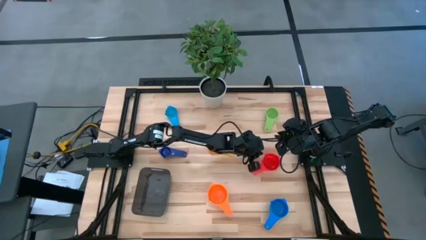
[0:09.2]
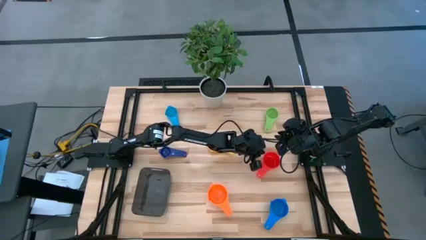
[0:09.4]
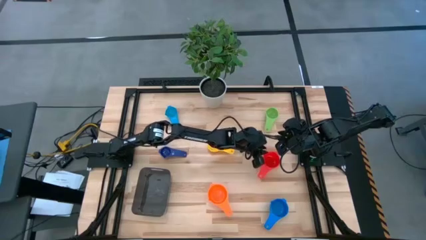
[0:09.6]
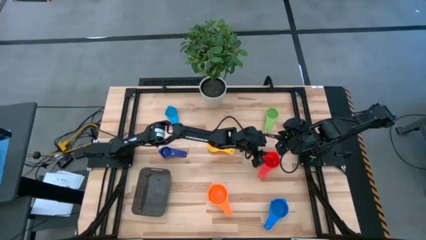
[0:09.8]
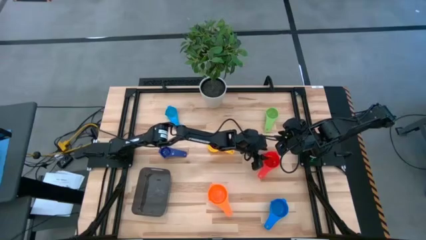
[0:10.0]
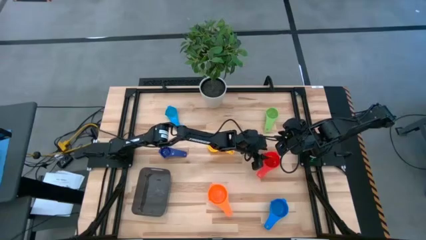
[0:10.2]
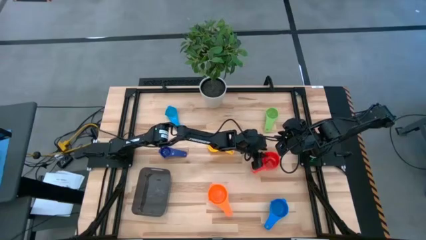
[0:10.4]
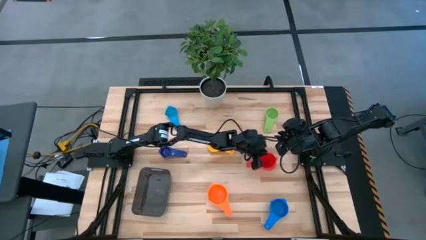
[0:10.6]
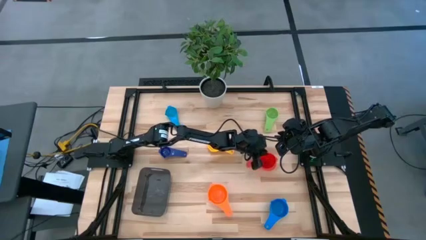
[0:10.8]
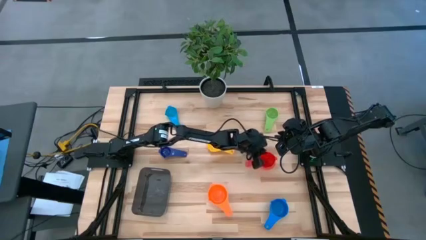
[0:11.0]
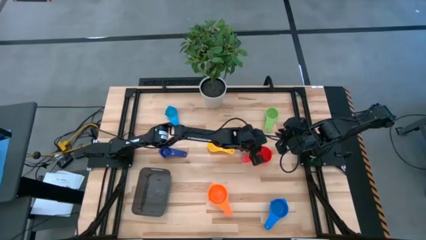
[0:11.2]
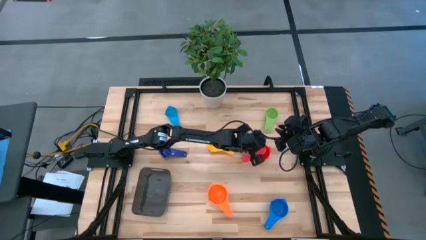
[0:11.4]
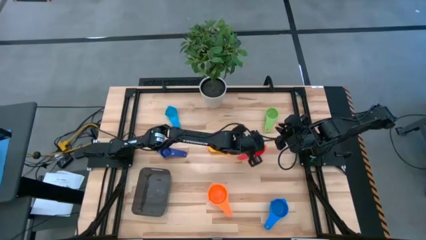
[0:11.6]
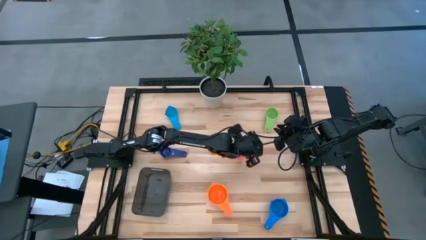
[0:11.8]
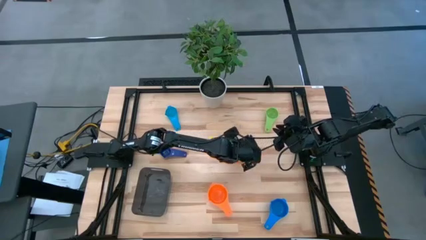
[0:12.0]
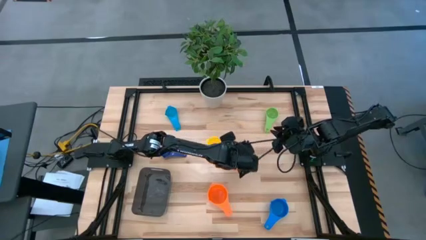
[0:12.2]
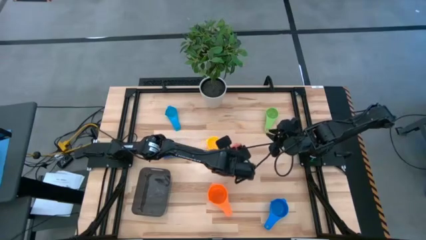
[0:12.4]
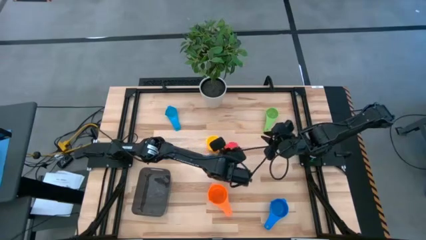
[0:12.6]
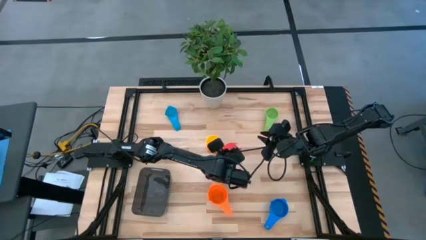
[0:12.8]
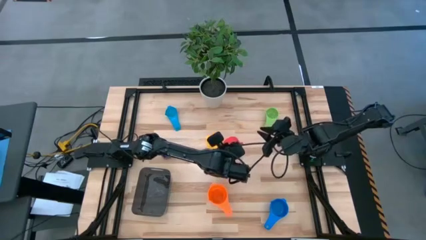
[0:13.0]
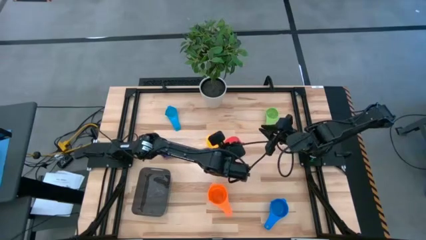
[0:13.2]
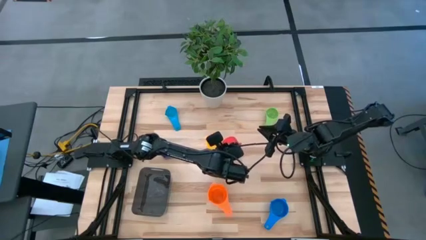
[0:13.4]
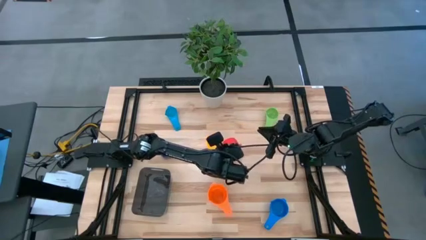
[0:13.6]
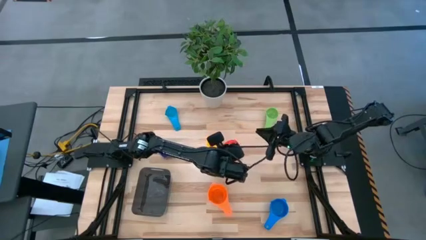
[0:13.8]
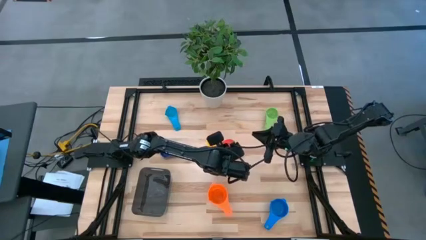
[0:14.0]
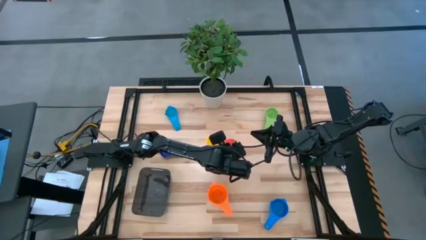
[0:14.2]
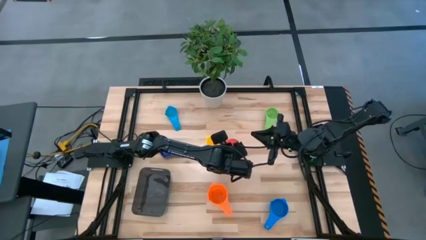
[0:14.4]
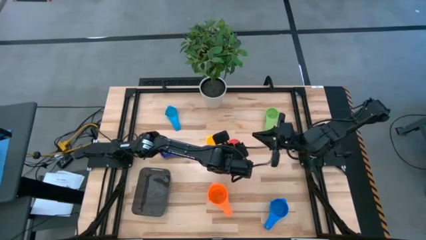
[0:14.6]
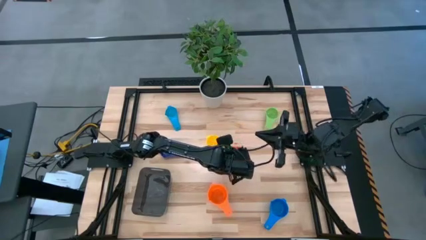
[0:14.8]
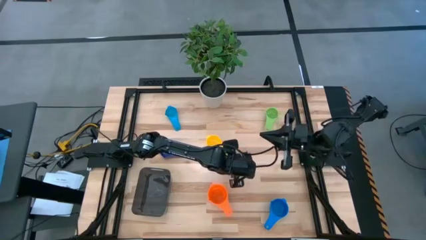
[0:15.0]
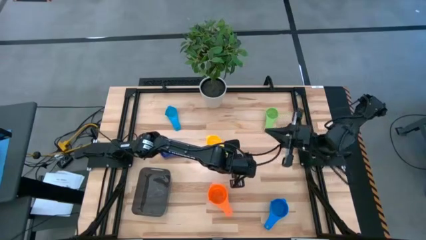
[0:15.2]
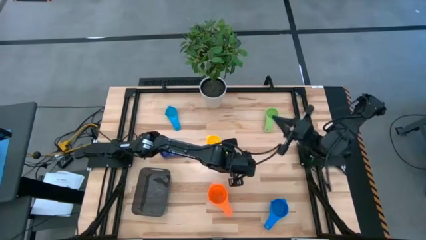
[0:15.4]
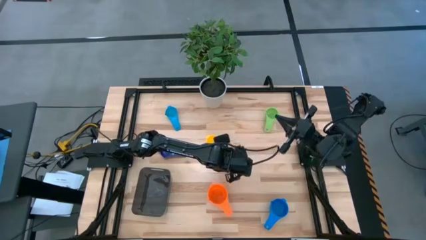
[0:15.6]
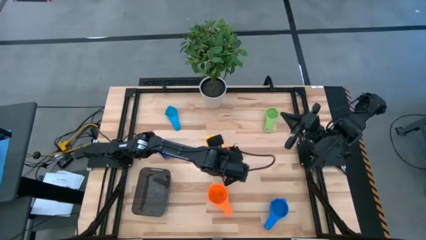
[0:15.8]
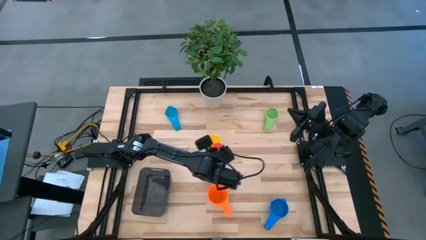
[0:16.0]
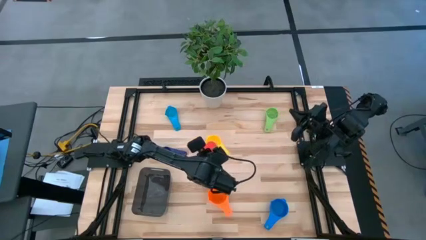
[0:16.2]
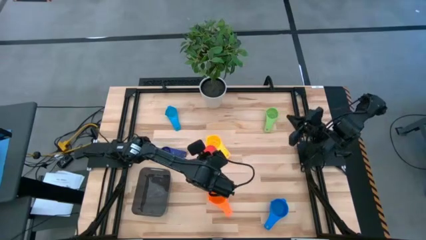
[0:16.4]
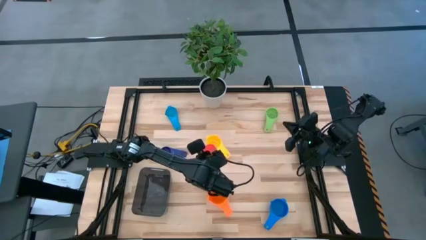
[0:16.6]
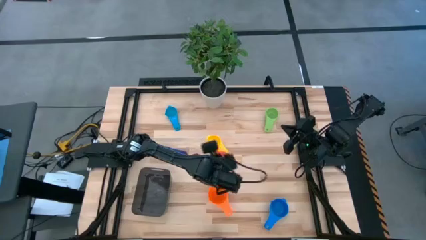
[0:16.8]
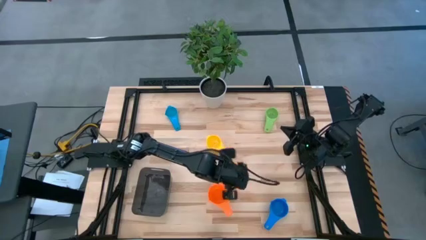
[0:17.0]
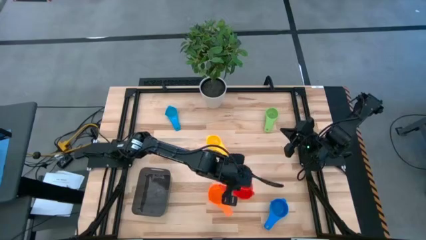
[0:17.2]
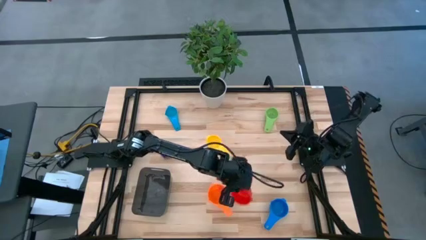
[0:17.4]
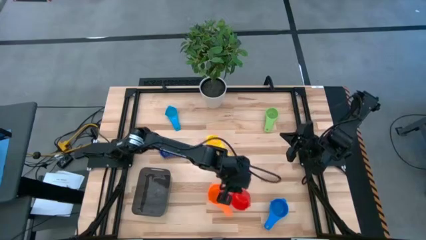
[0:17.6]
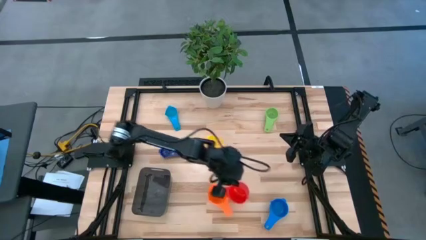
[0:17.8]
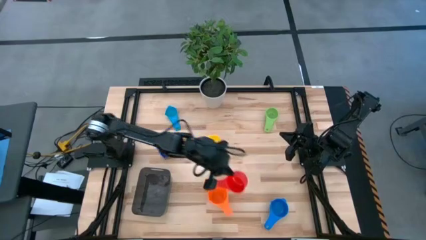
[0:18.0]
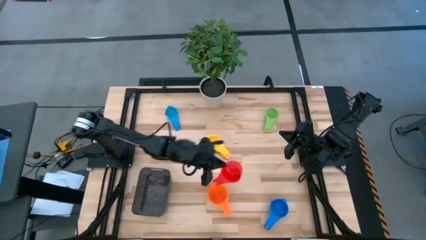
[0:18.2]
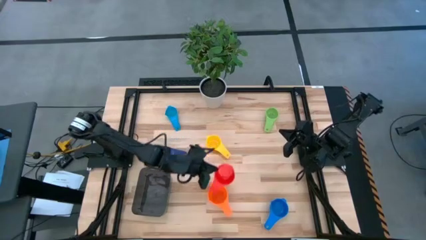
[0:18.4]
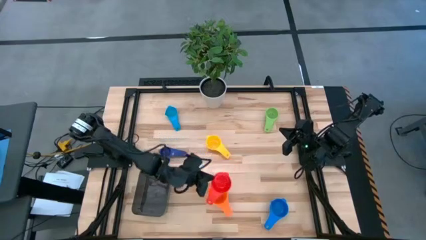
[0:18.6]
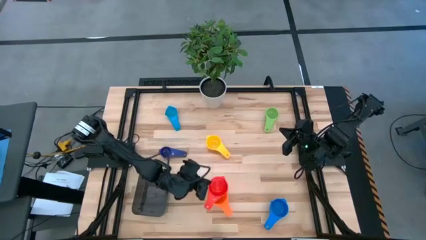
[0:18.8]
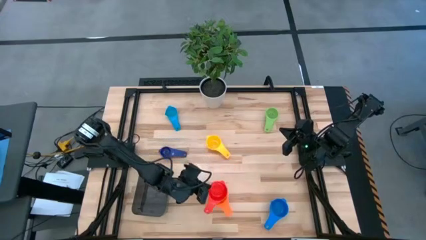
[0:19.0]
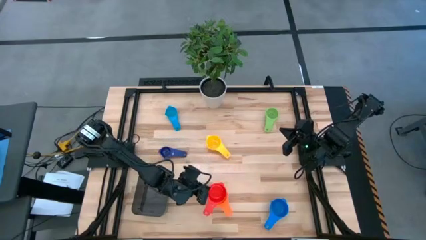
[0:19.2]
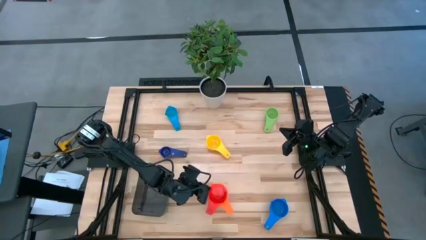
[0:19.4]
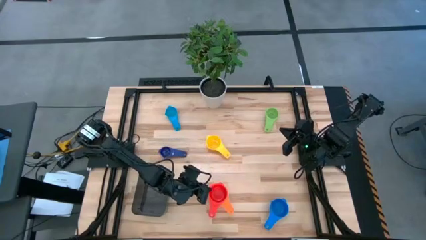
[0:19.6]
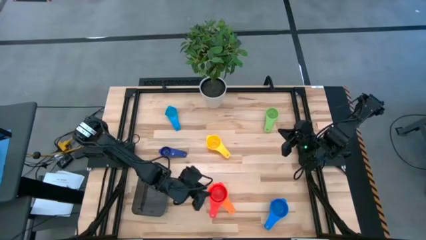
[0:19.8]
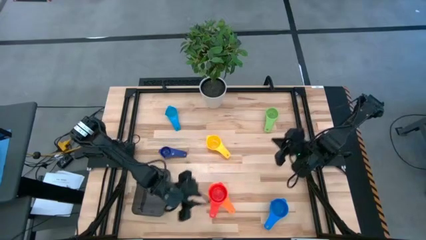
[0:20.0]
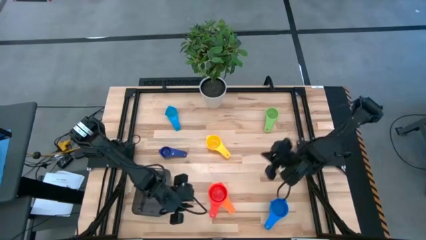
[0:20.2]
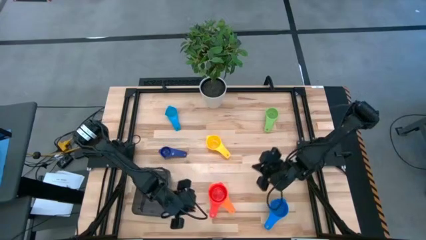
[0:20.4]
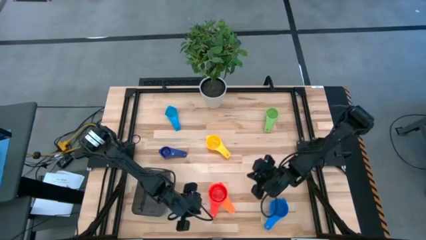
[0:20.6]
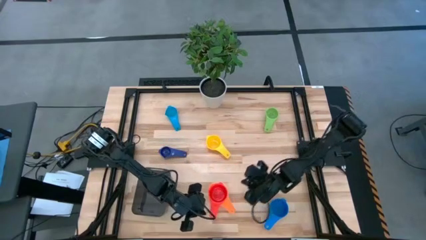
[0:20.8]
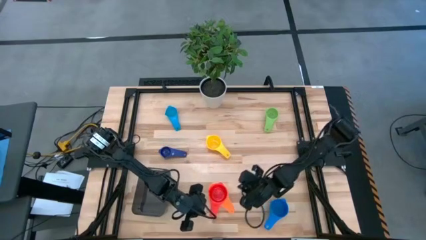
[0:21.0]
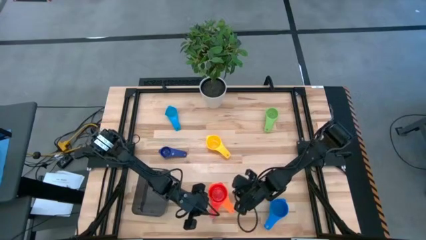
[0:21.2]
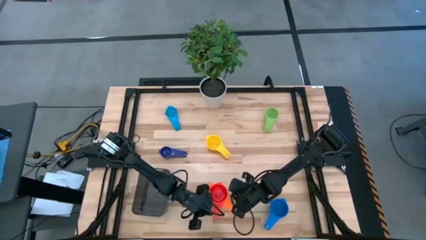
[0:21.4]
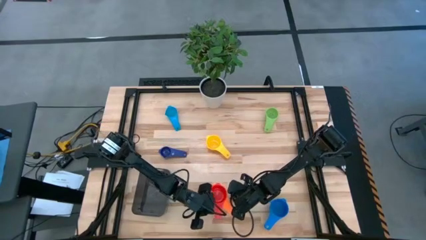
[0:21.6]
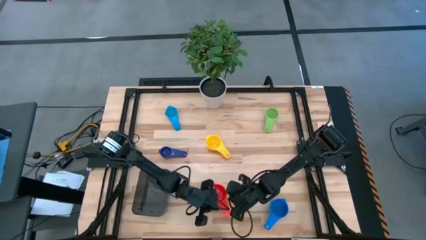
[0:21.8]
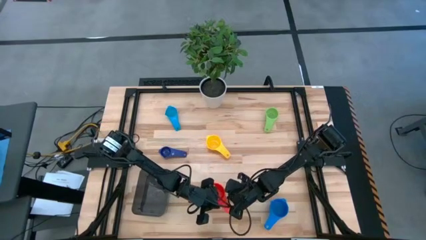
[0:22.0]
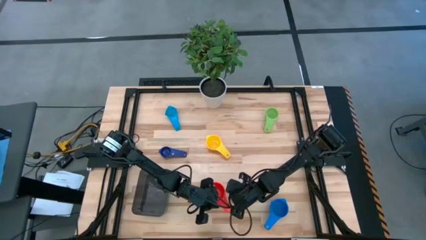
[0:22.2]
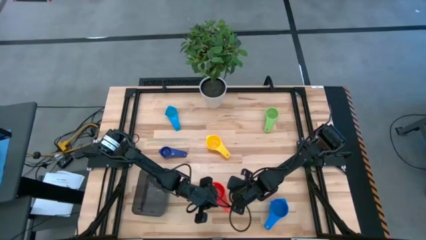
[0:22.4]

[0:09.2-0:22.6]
Task: Nest measuring cups in basket
Stack the red measuring cup on top of the orange measuring cup

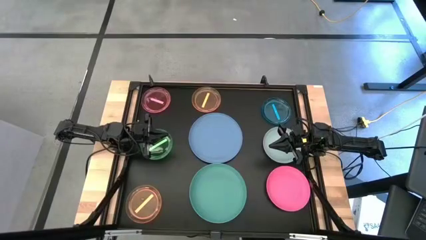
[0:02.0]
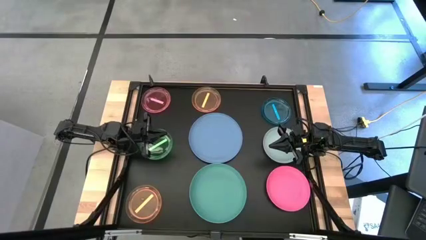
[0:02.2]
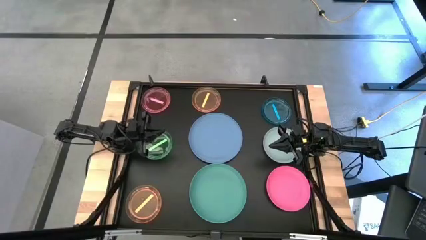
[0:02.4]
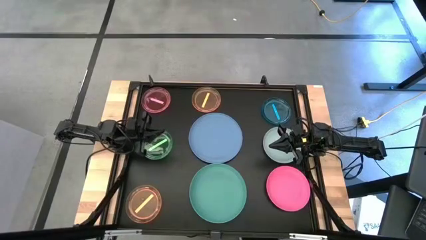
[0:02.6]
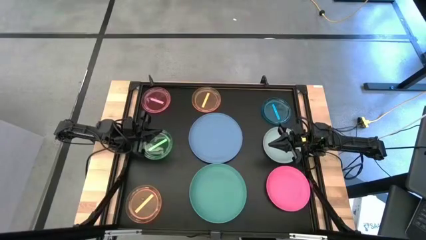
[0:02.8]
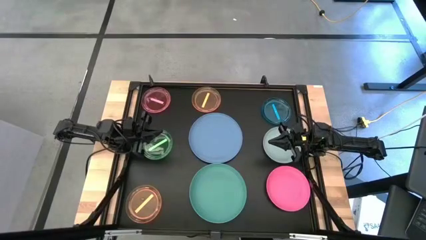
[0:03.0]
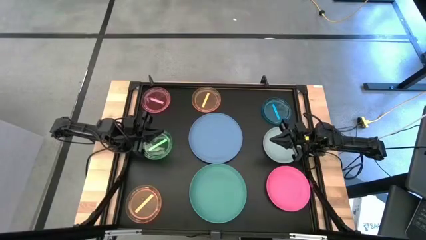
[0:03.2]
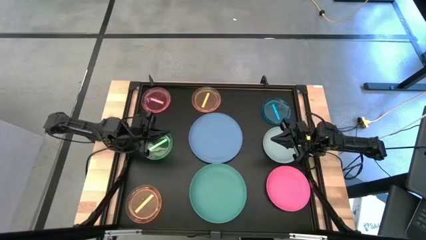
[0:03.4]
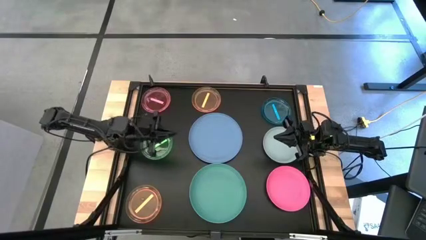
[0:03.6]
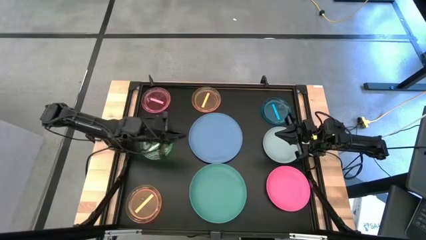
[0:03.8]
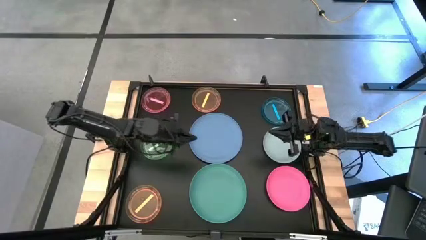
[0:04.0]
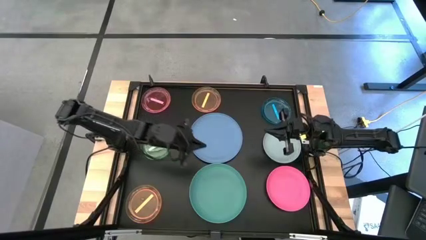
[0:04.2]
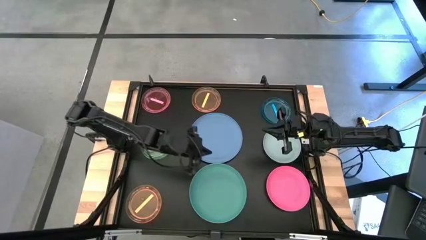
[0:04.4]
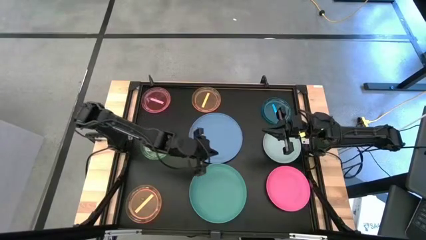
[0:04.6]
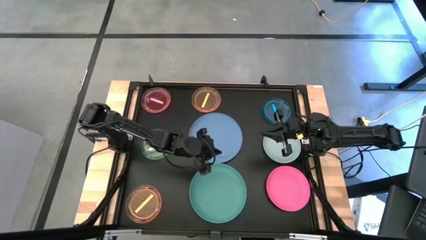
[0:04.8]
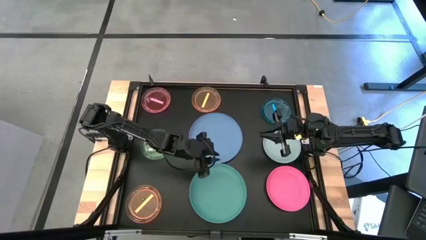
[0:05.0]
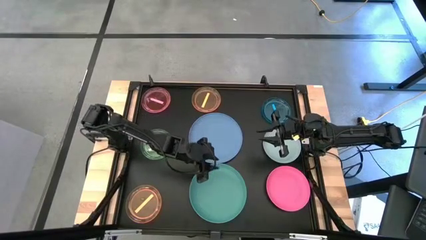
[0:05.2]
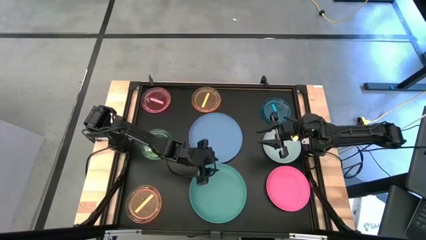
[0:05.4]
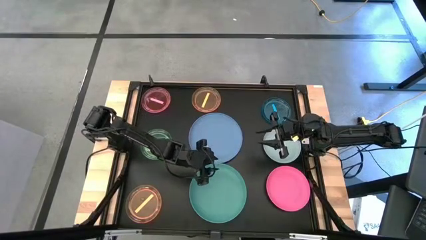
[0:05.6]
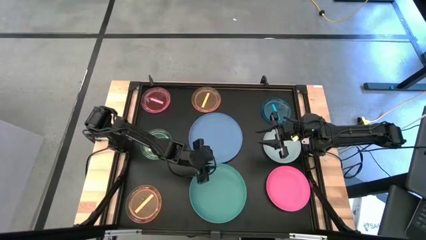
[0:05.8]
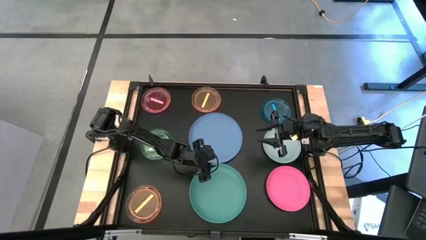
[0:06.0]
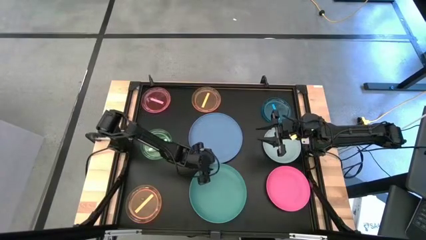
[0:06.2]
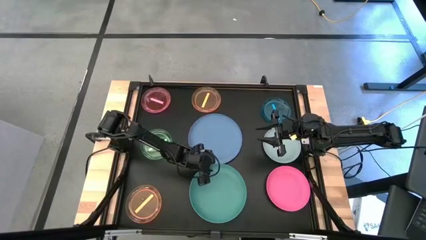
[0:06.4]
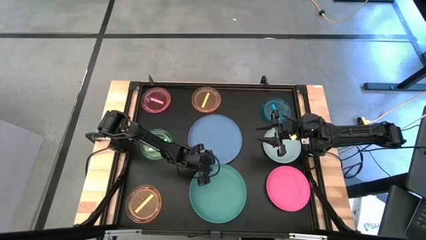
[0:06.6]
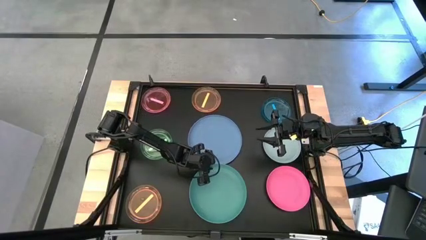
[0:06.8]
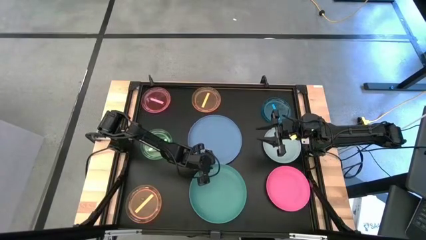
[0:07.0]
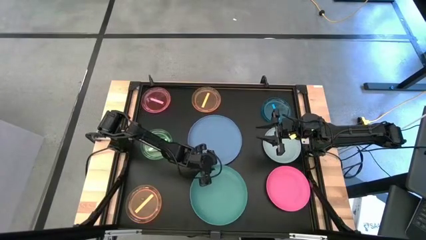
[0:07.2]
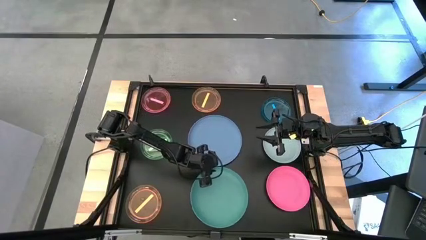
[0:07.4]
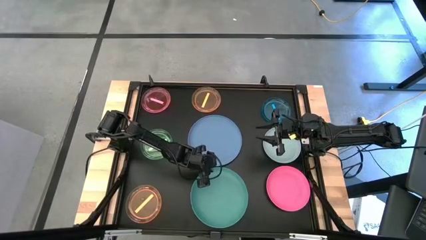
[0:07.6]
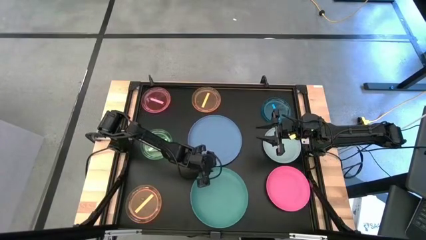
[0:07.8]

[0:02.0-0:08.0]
Task: Stack plastic plates
Stack the green plate on top of the blue plate
